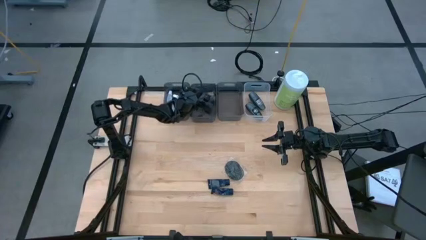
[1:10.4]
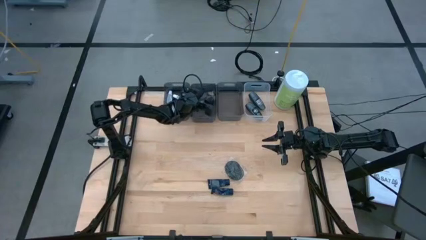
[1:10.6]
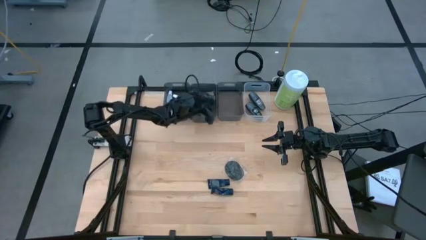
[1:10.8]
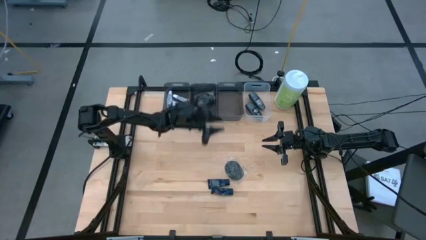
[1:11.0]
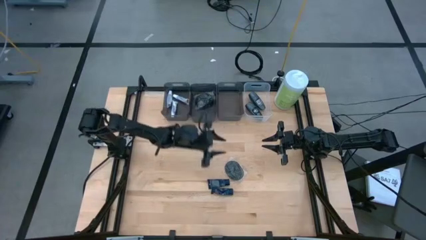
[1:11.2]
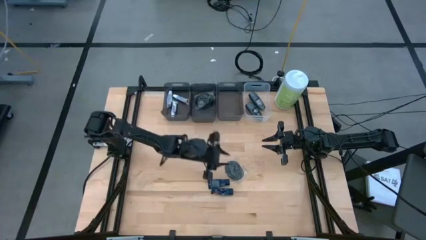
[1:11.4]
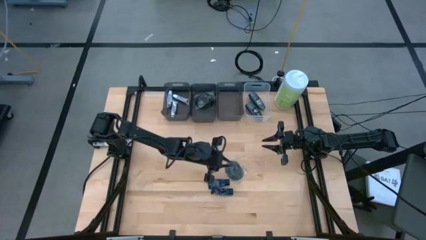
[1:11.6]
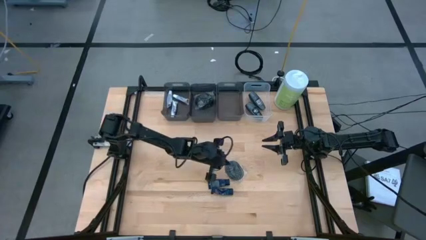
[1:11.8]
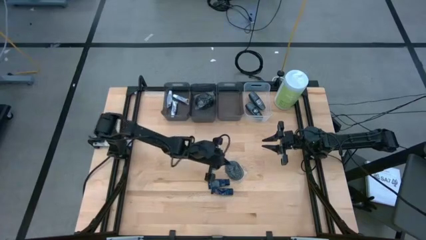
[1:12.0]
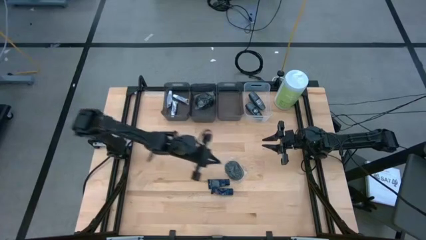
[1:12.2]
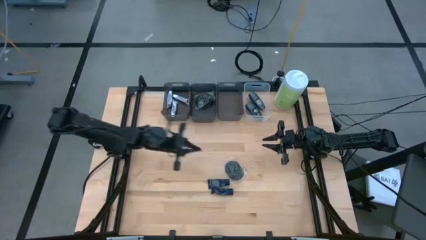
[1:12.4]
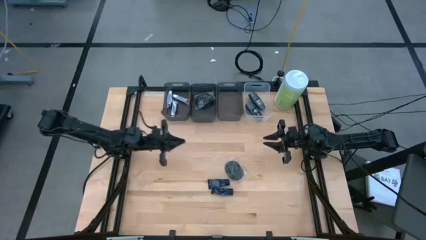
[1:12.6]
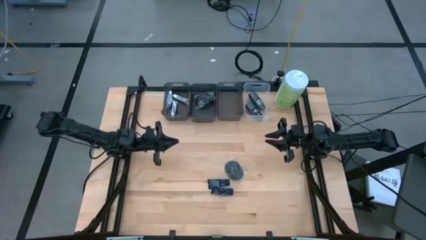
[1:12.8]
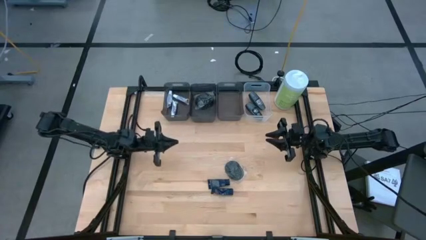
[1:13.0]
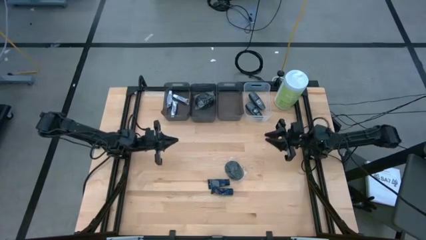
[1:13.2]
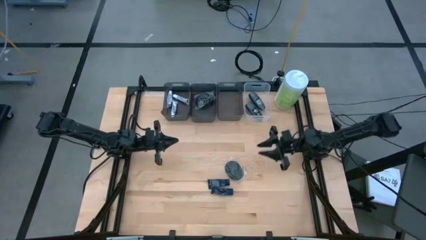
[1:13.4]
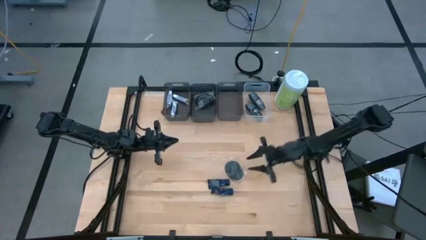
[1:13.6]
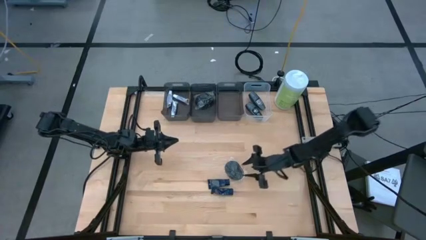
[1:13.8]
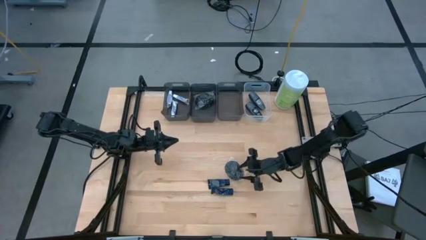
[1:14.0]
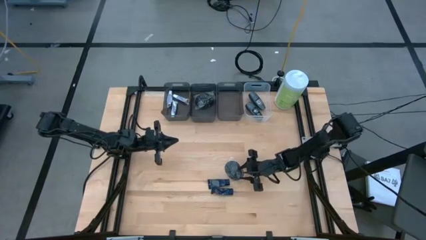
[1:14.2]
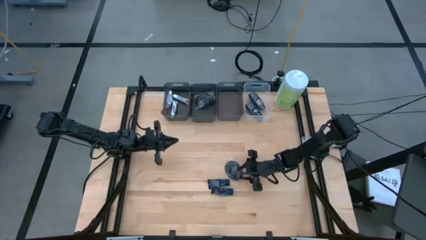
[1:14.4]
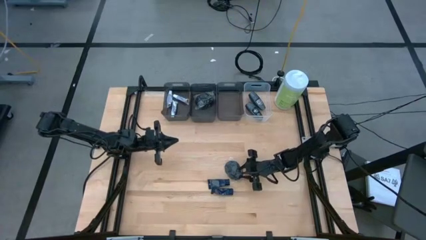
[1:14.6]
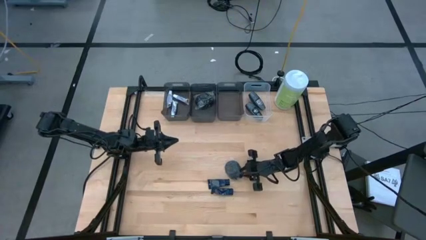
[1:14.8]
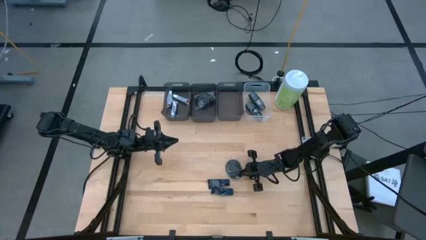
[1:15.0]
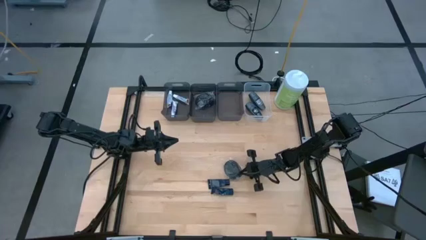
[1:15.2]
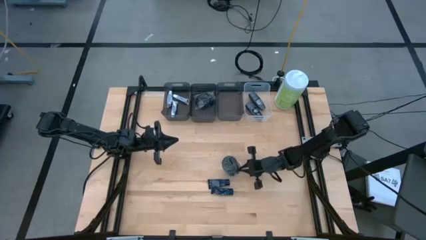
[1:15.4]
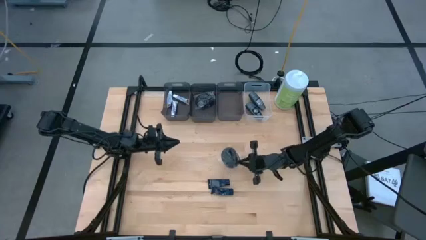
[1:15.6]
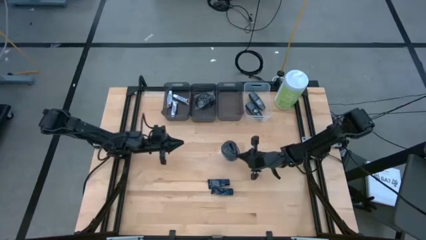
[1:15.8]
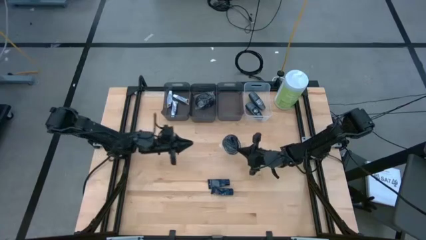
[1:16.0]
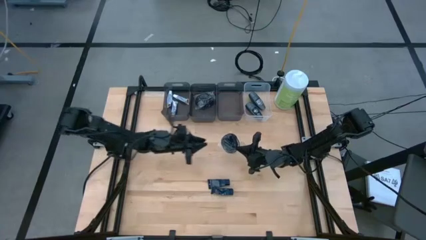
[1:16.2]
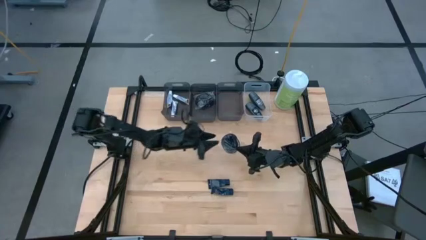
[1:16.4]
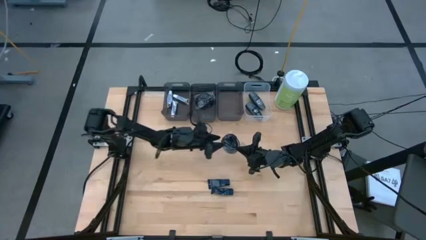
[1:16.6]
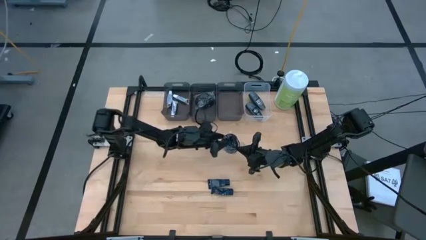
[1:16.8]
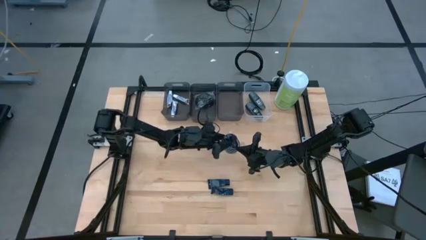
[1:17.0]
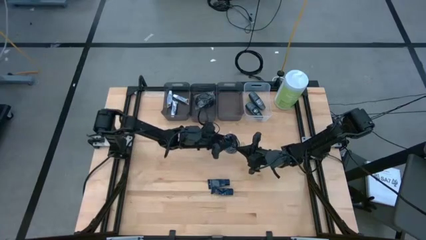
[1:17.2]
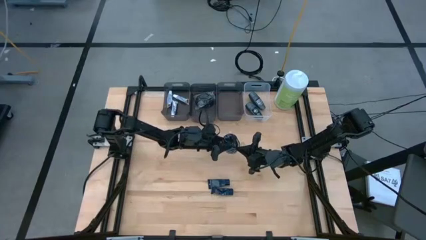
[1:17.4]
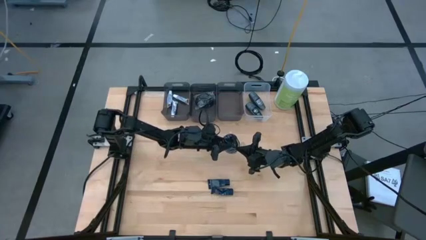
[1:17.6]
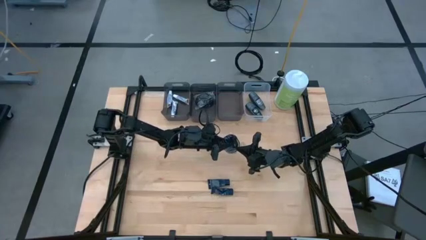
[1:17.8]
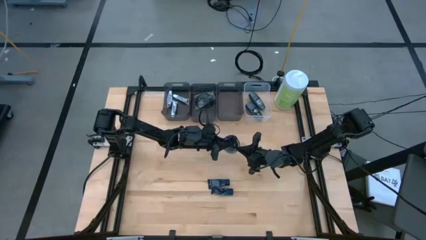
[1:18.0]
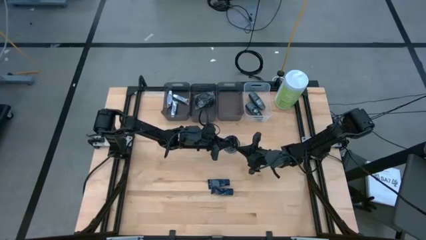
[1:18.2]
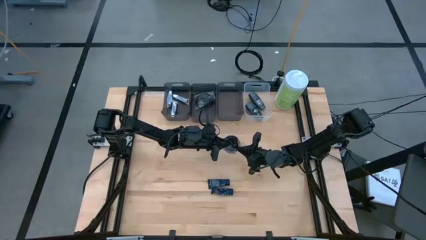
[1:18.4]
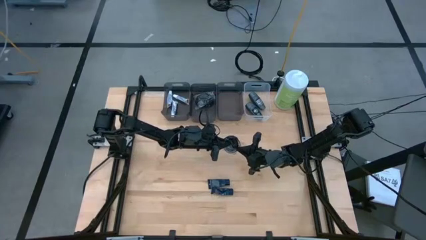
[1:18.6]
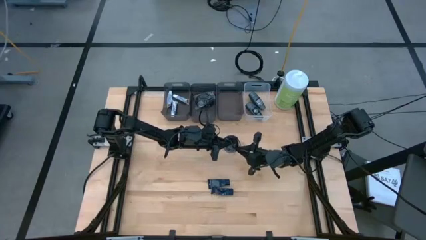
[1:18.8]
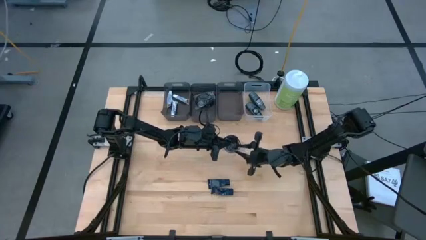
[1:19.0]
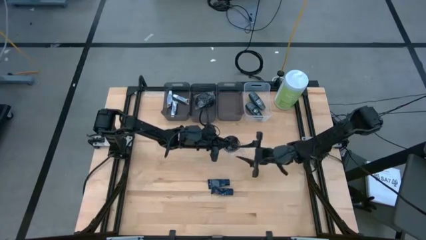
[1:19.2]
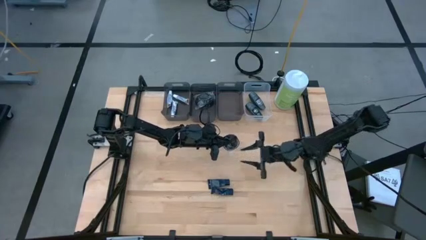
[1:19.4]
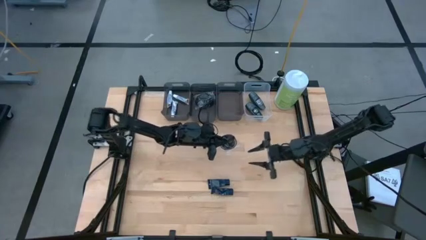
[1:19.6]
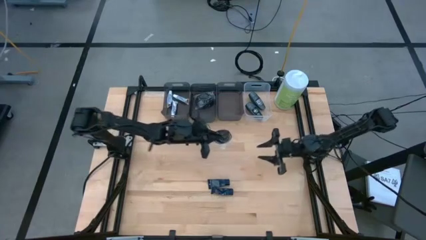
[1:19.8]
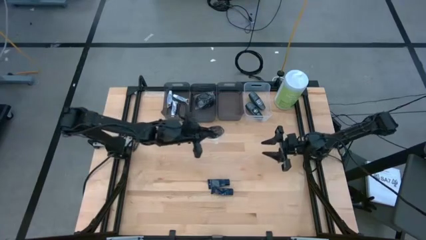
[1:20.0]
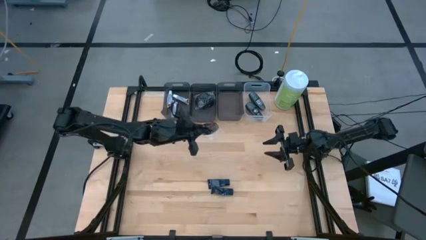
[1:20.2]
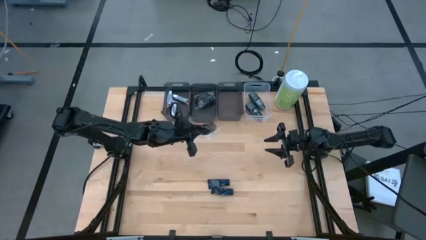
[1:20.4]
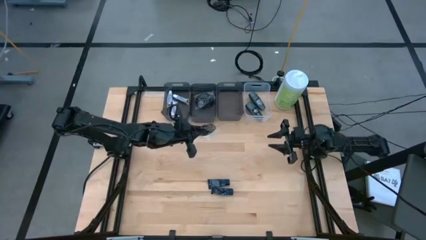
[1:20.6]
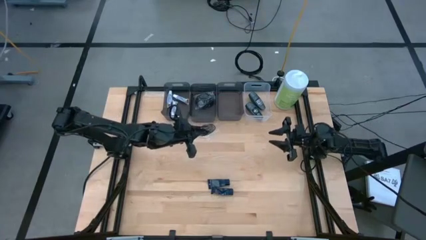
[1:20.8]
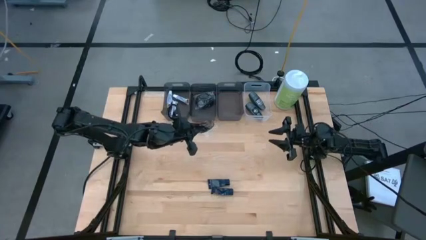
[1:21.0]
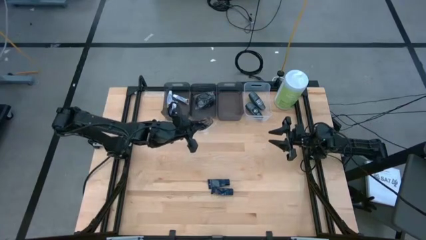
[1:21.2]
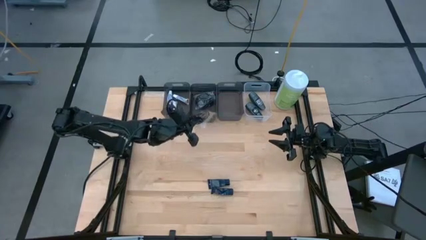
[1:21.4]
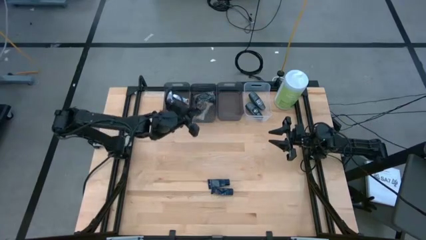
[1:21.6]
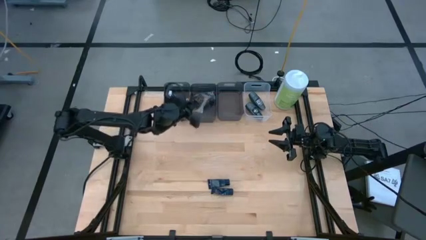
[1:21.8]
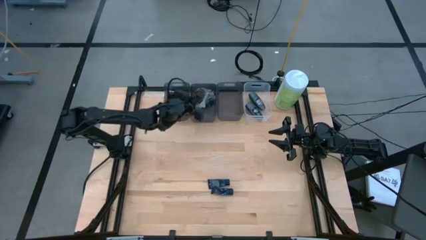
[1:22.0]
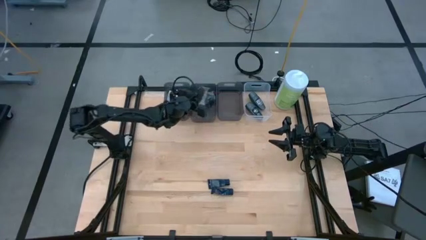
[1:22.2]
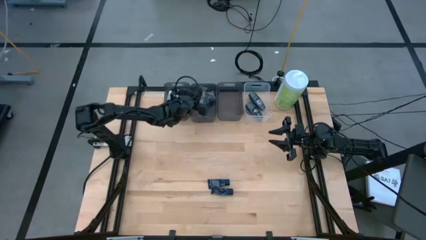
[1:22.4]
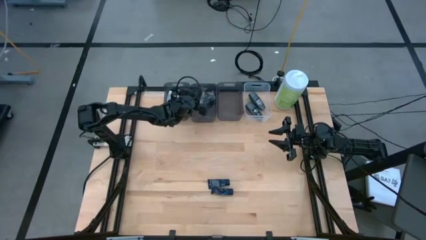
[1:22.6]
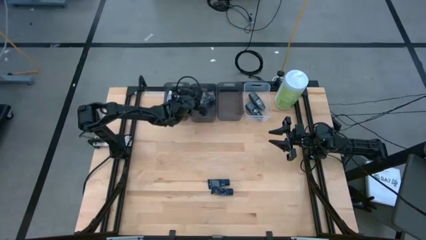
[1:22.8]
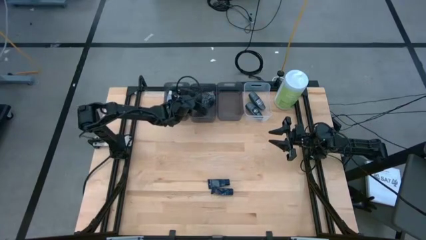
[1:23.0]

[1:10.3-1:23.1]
Task: Pick & Place Travel size toiletries
Put the hair brush into the middle black bin

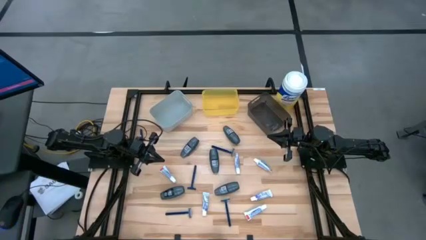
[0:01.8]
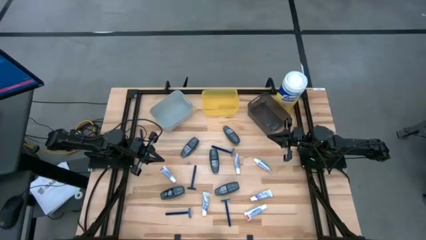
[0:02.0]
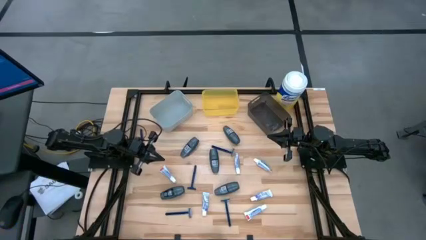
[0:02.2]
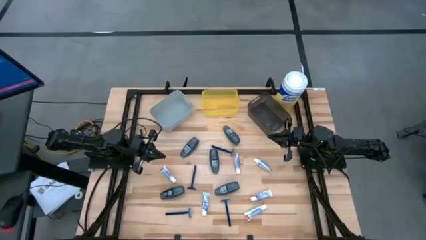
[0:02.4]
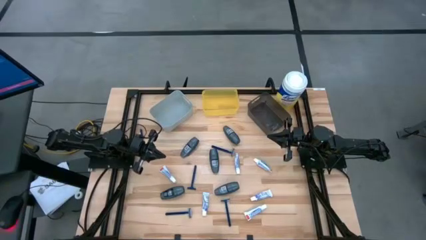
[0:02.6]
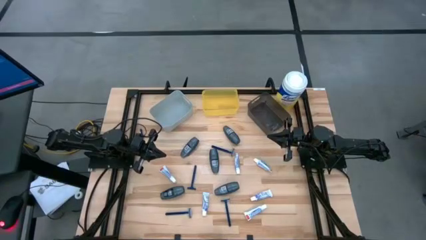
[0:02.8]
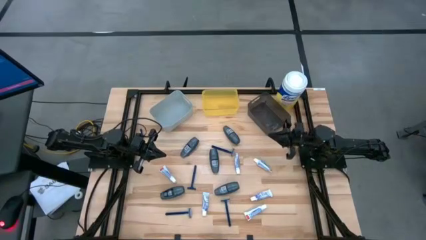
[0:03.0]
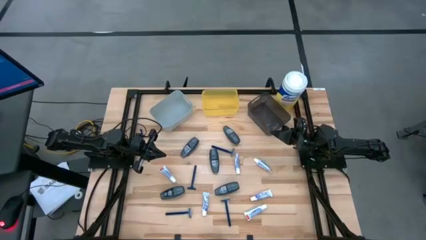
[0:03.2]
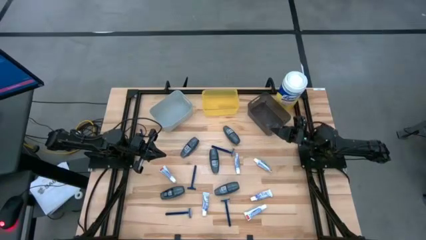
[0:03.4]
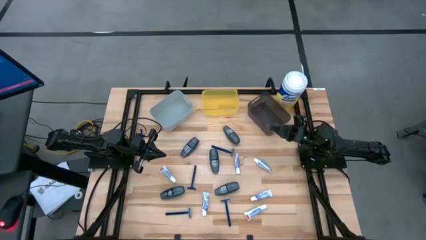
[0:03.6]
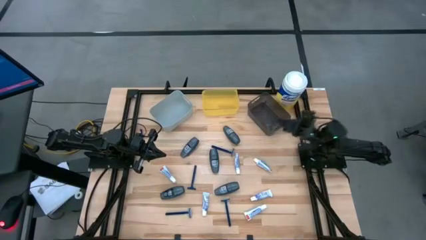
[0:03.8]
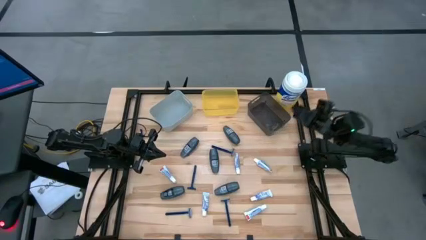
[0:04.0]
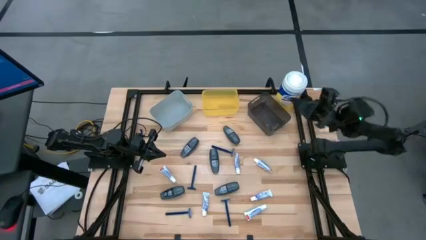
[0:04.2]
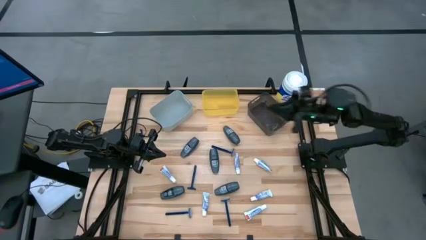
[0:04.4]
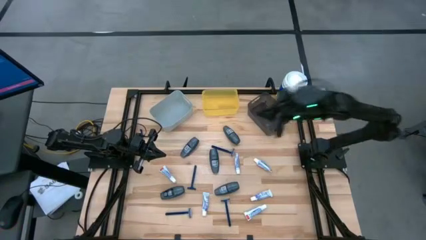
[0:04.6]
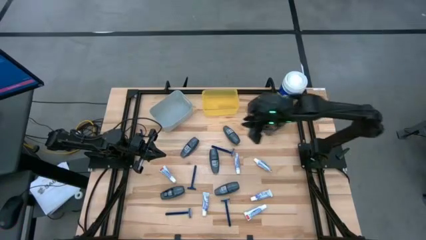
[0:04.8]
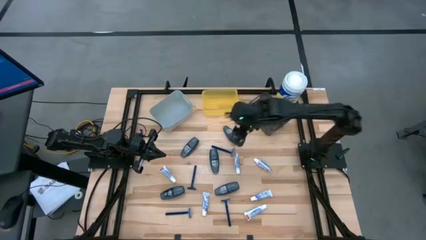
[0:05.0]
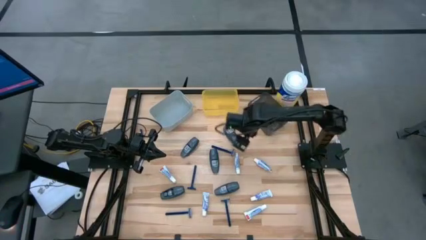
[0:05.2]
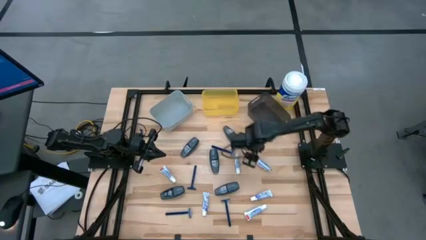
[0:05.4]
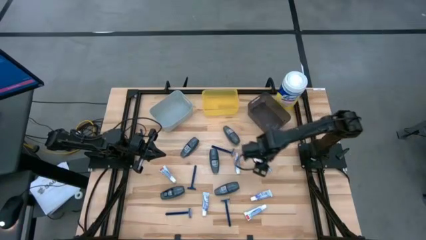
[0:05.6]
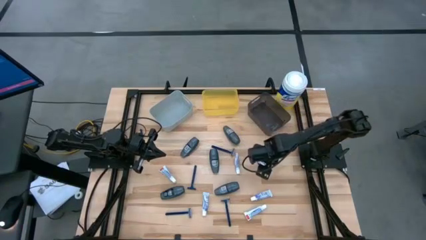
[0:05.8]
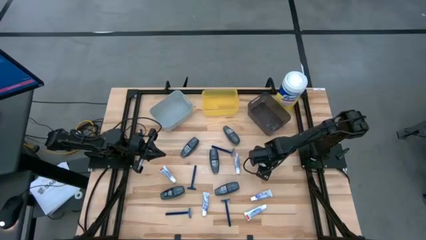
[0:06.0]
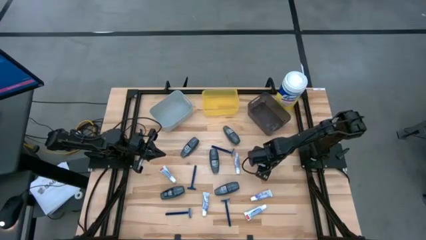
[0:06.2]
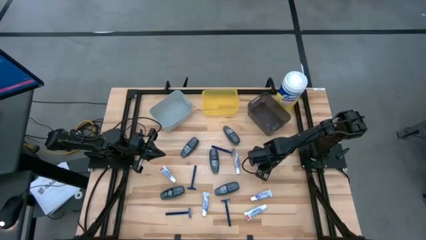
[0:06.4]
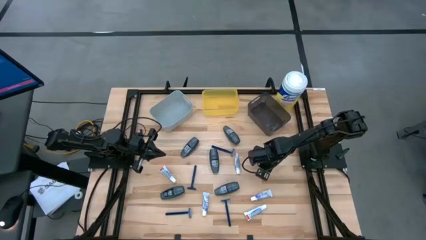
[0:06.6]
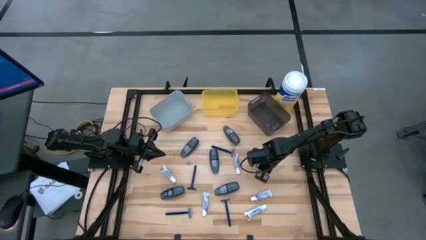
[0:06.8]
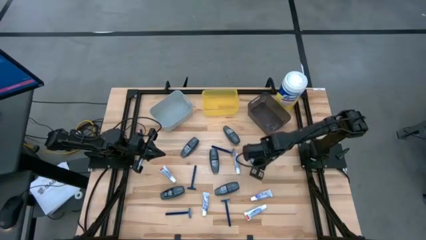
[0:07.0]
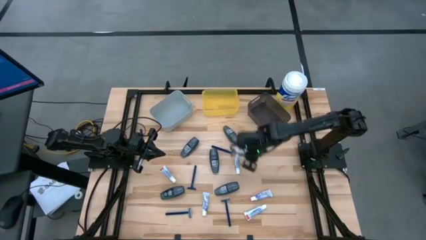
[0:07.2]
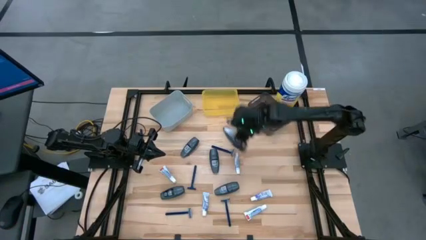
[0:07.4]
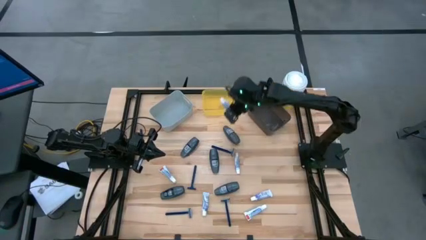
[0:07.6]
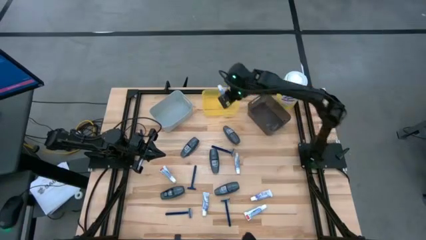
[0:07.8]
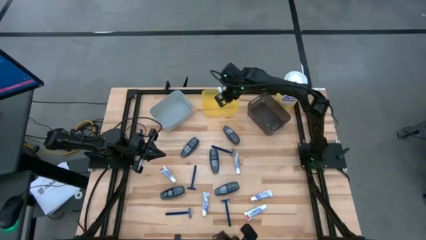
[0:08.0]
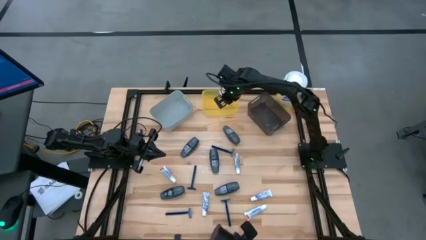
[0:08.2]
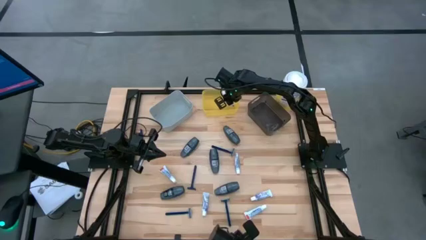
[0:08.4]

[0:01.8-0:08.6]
Task: Pick & Place Travel size toiletries
Put the white toothpaste into the yellow bin
